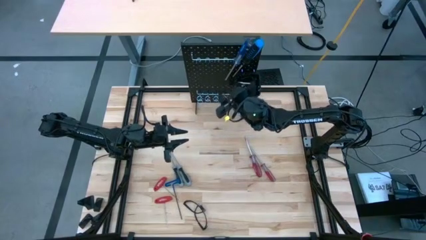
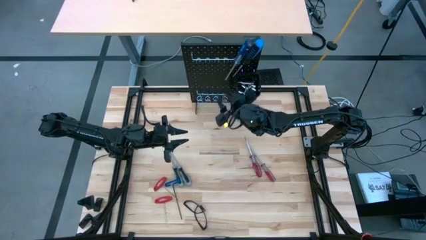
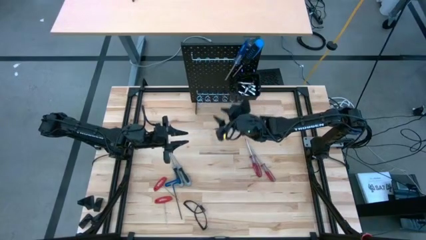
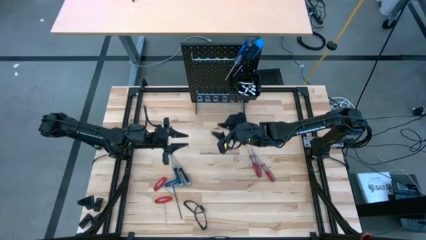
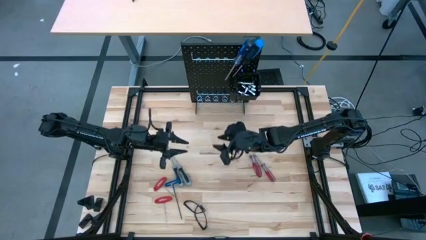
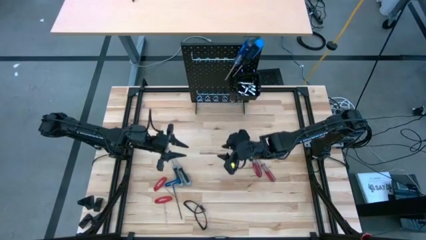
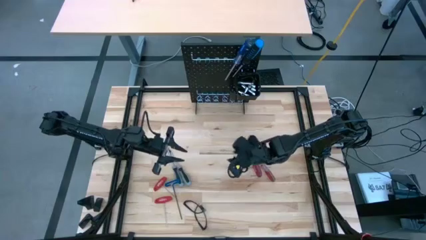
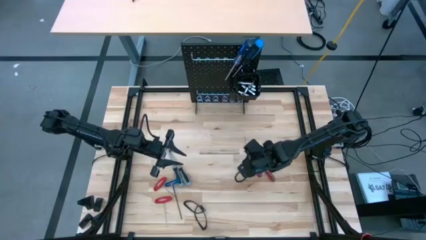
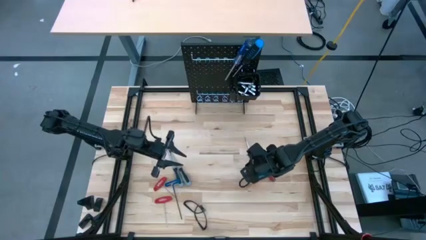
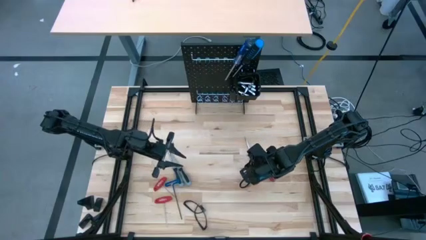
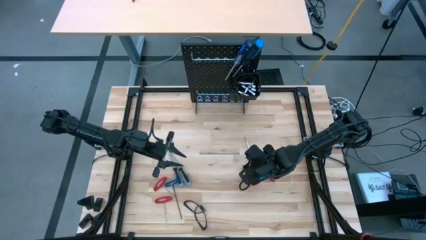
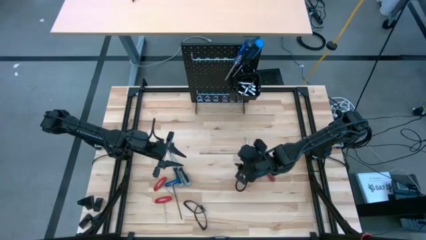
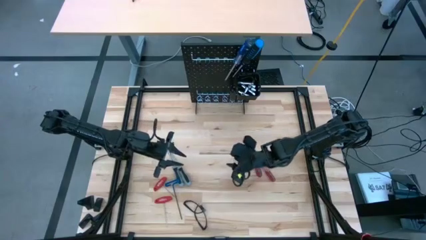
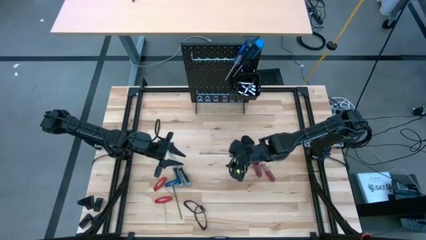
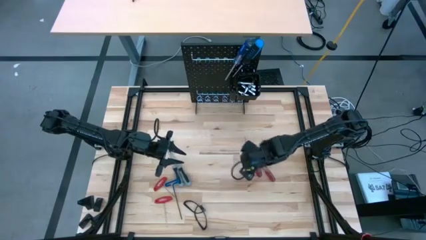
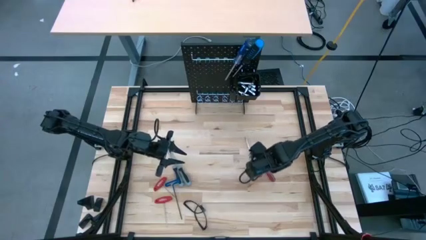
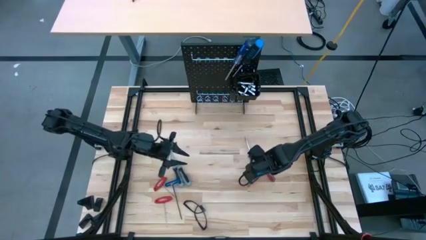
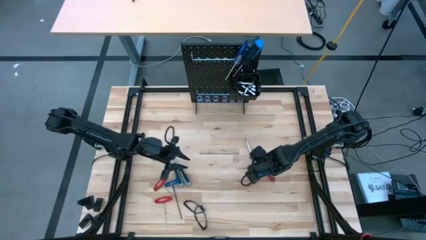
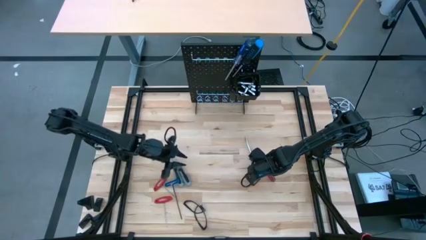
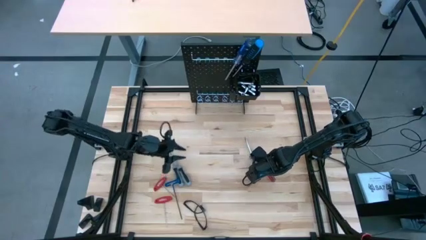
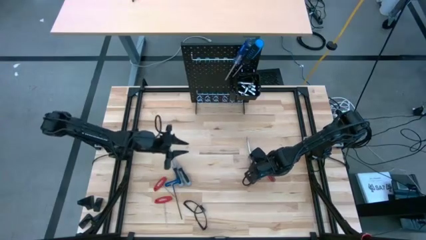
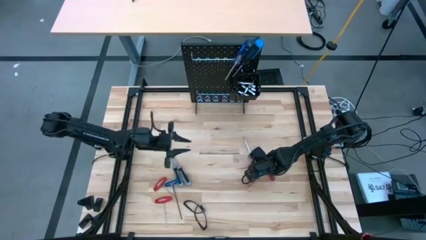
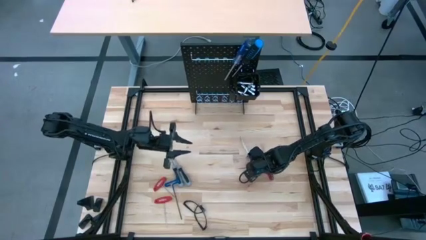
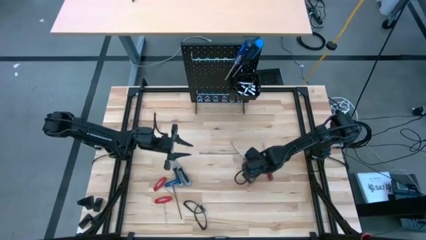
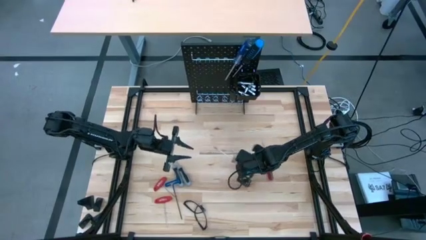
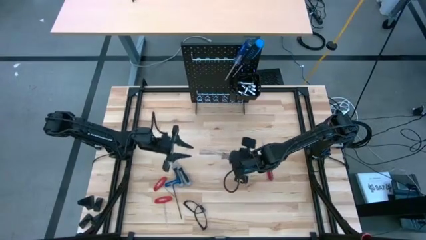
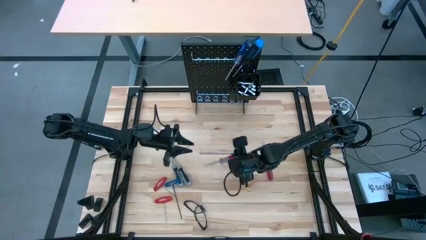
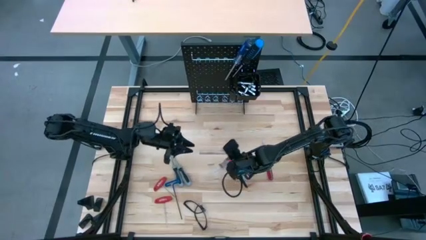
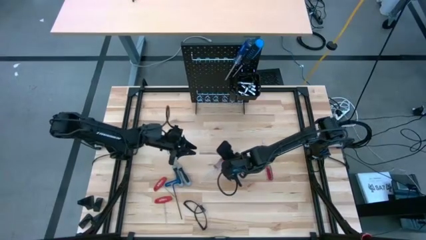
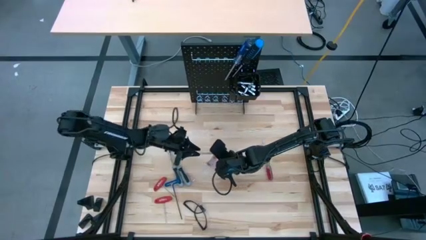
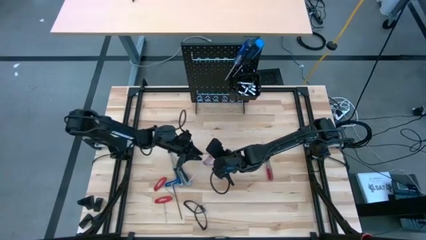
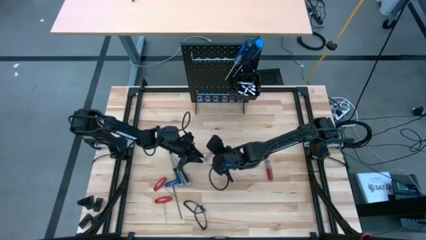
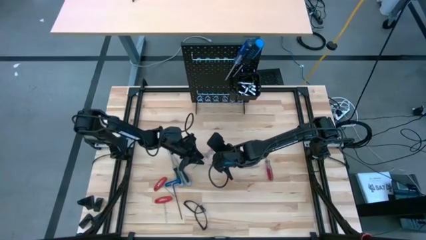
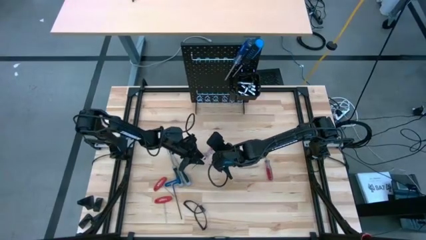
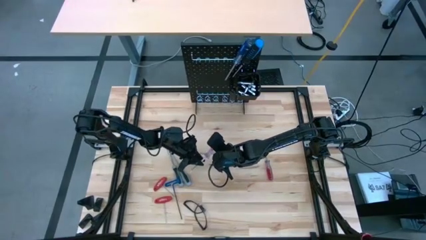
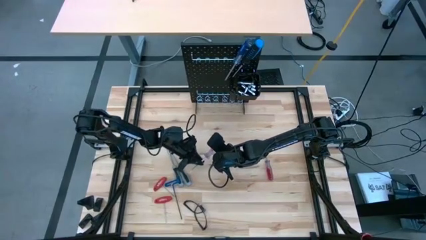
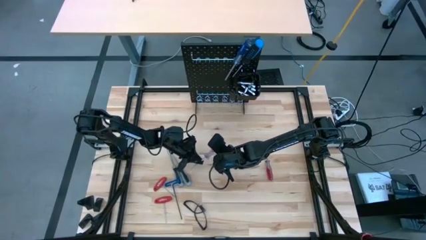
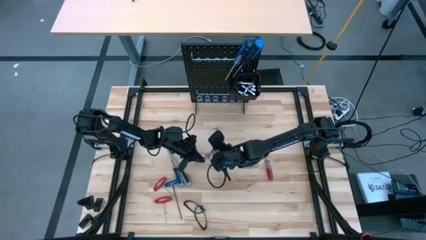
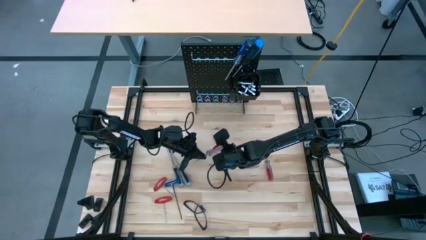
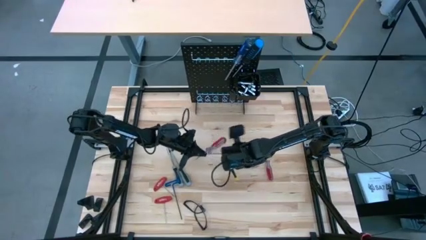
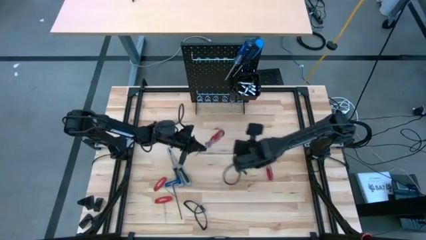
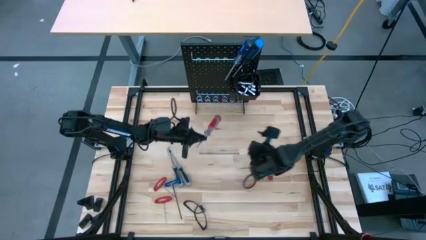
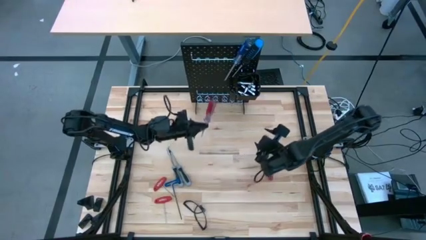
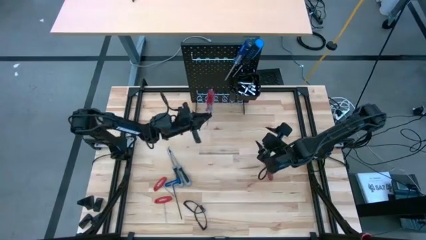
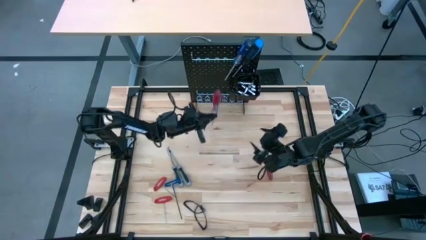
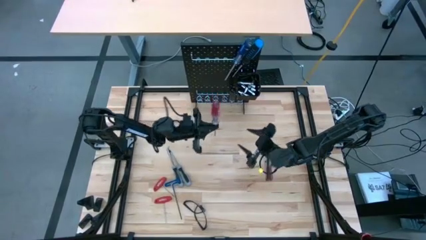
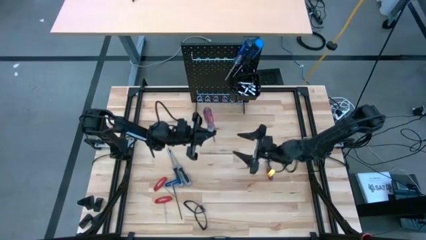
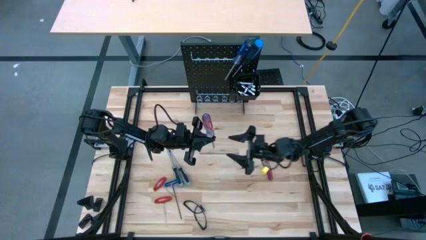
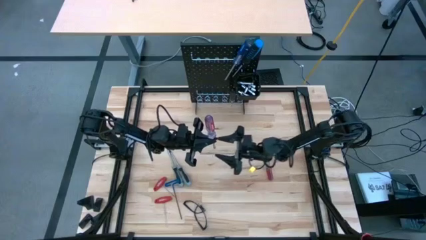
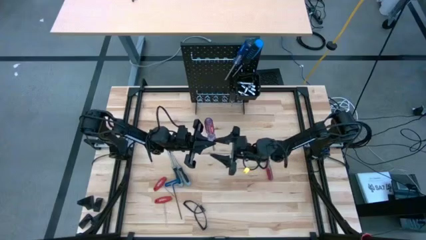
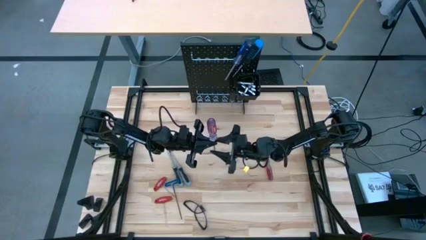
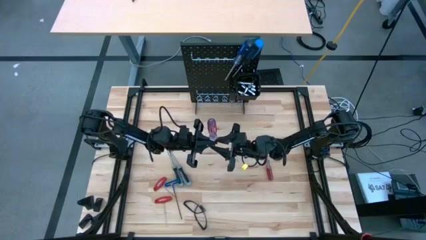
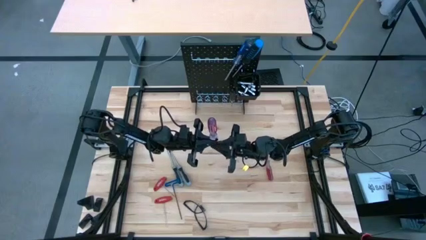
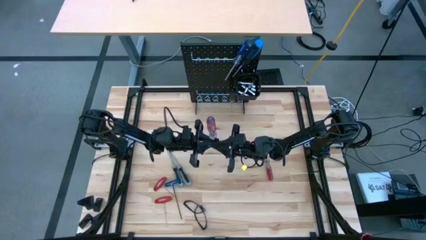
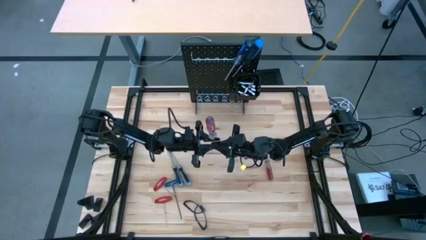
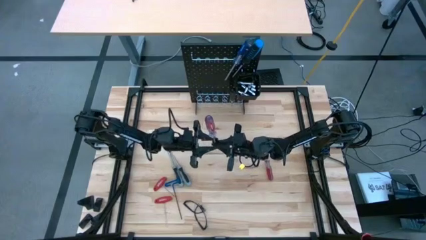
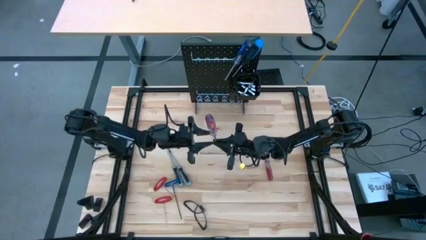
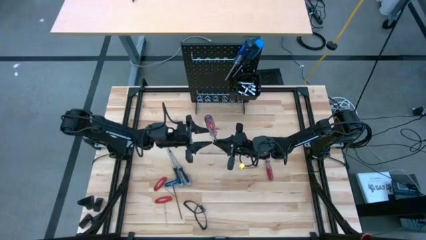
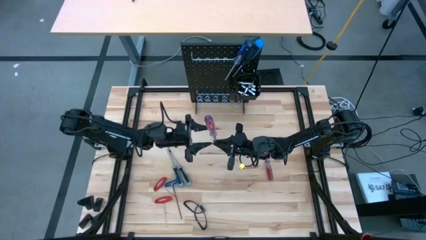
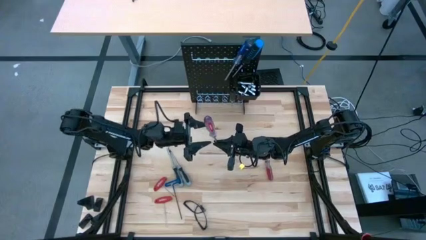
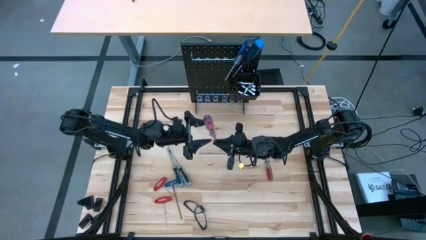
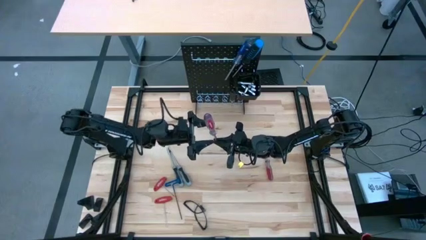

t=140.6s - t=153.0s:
Task: Hang tools onto peg board
Hang the red screwdriver on the pegboard

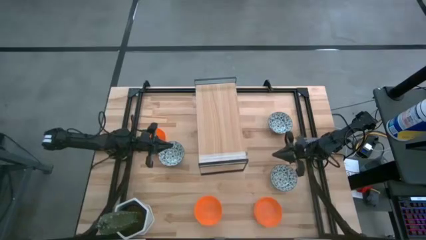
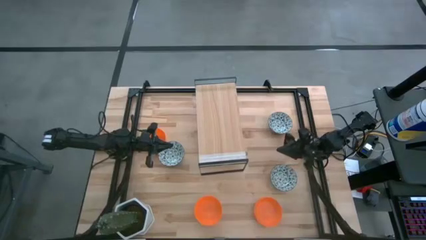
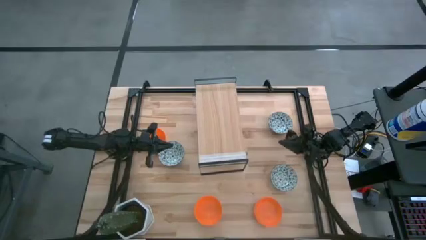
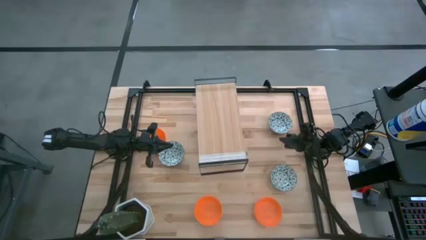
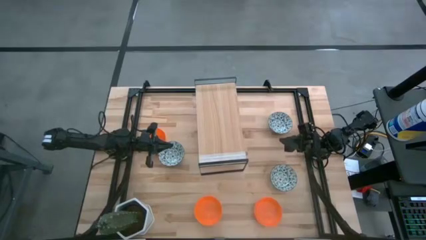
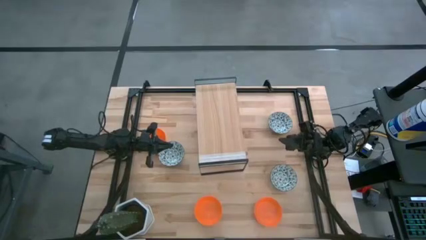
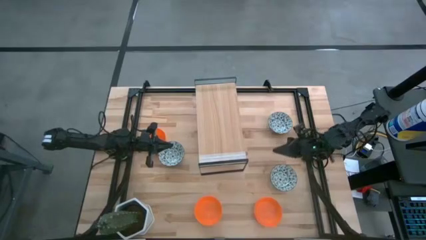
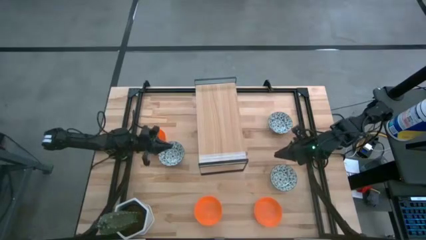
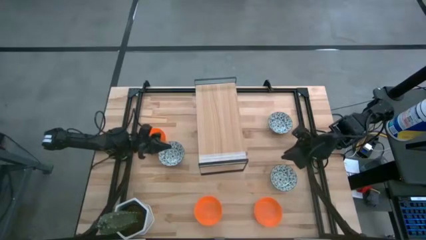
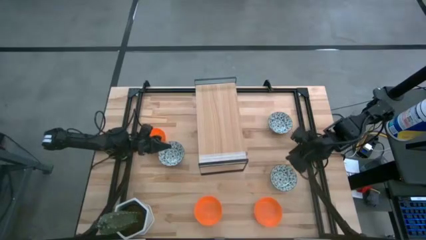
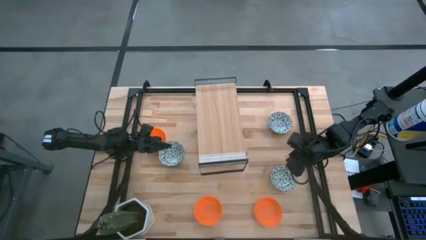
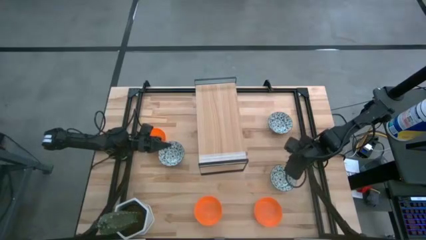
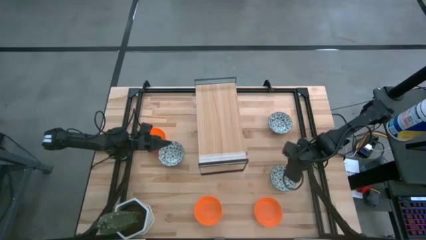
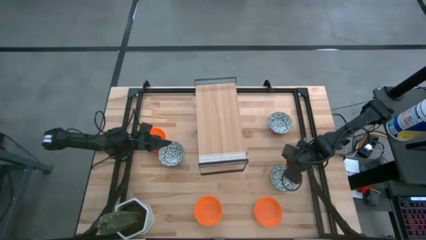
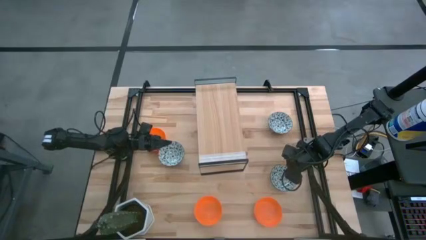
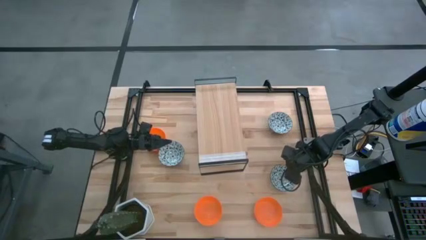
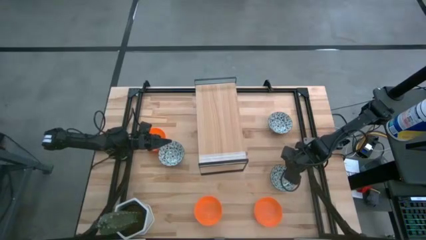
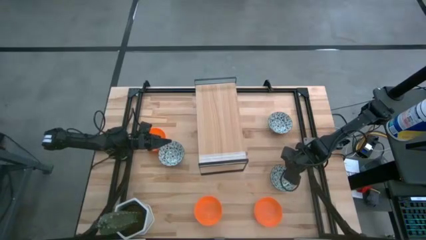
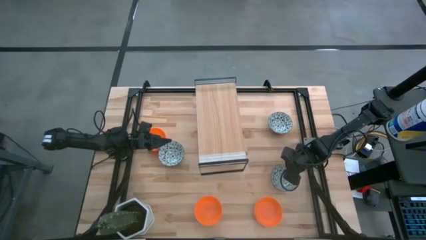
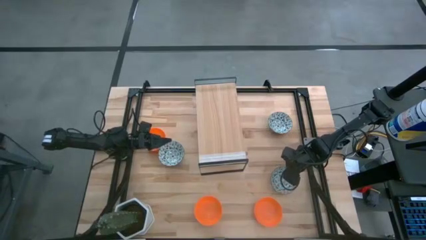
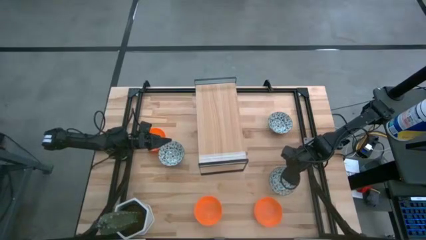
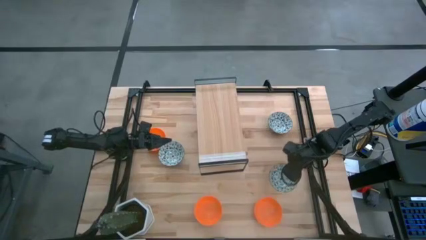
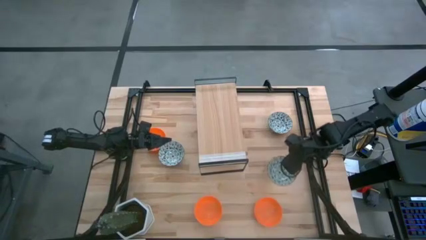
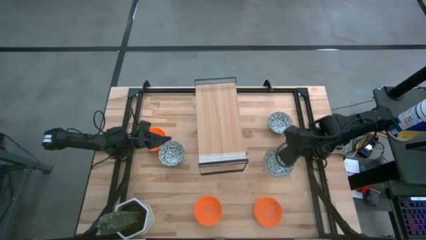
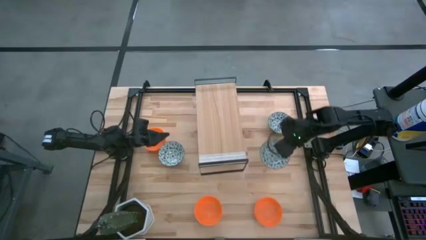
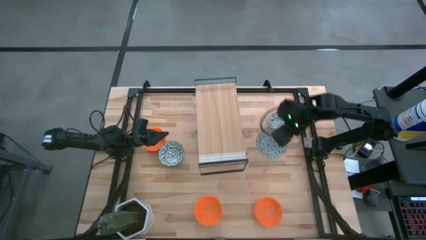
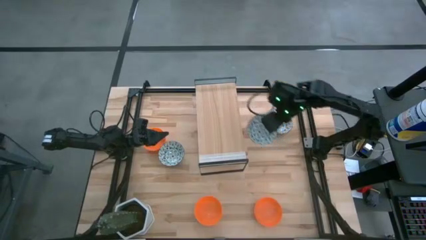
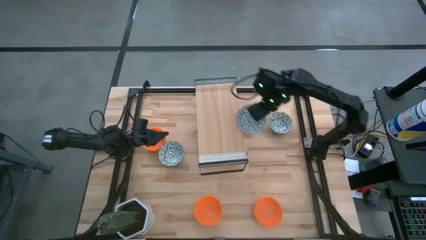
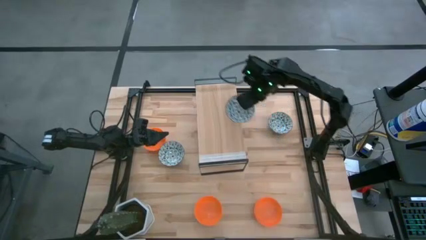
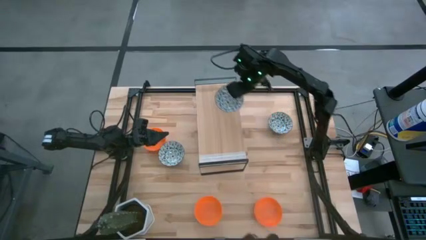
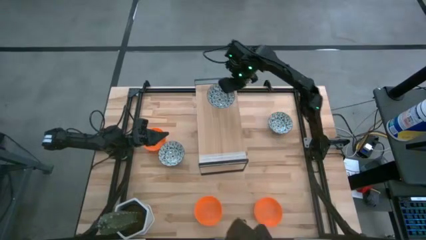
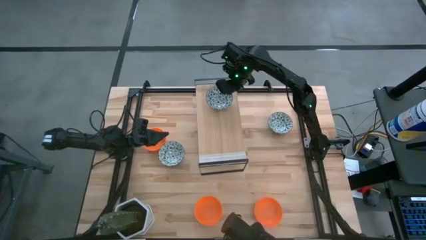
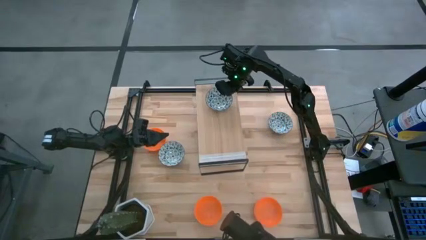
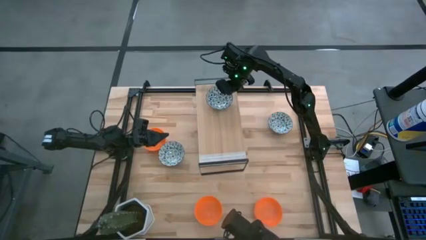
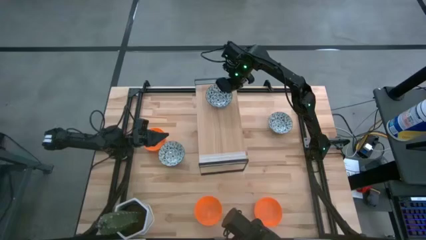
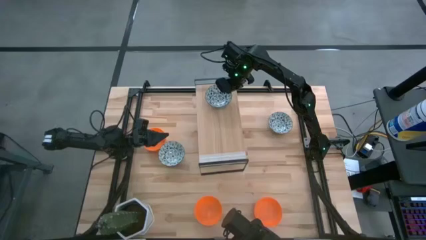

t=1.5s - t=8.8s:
Task: Pick & Place Mini bowls
Put the bottom blue bowl on the shelf
